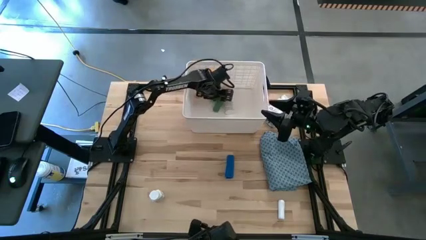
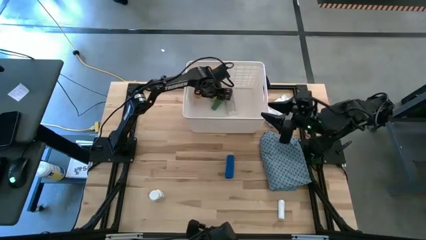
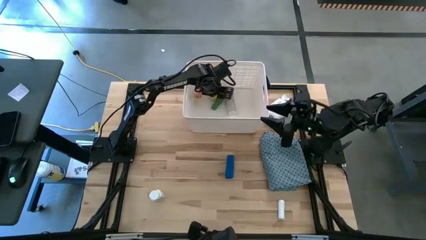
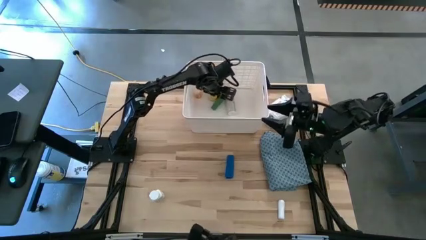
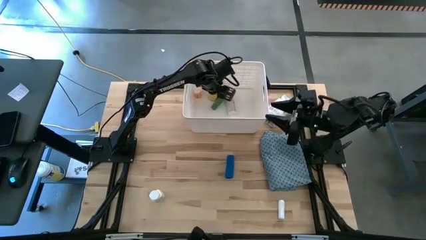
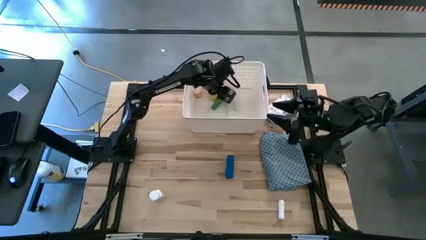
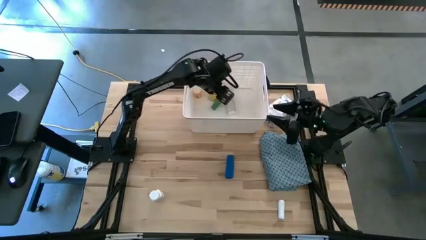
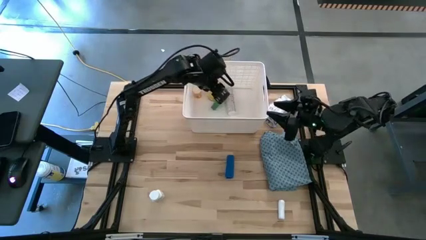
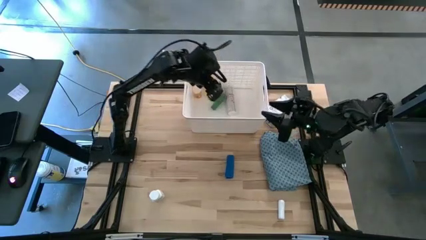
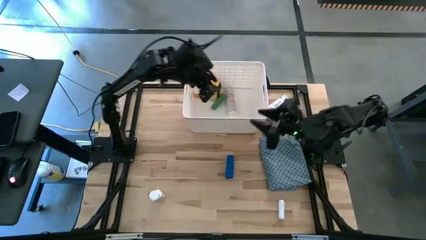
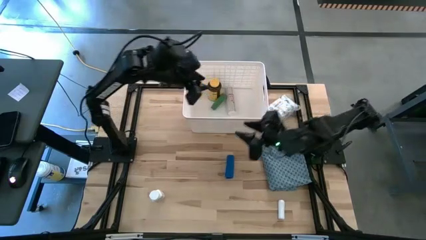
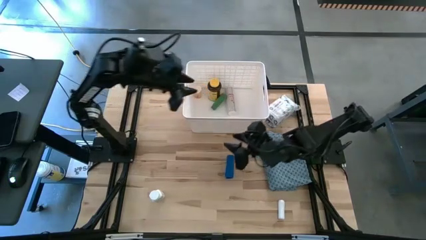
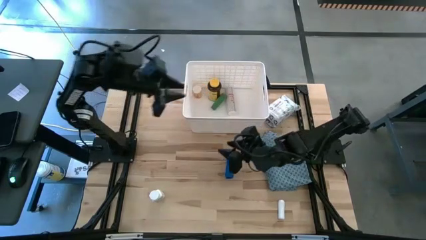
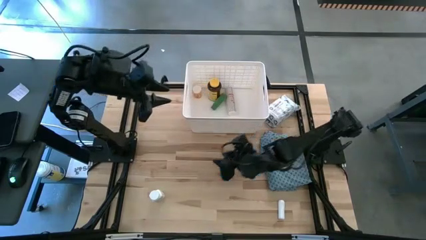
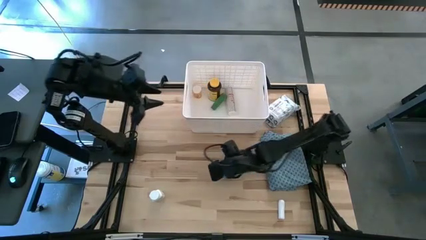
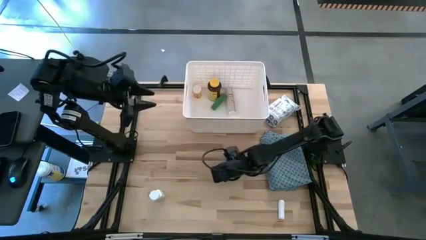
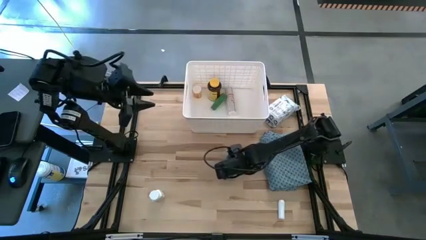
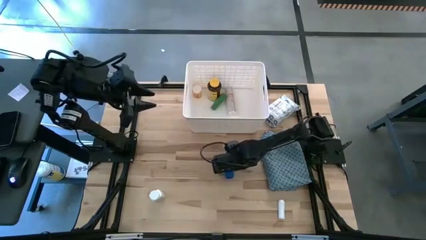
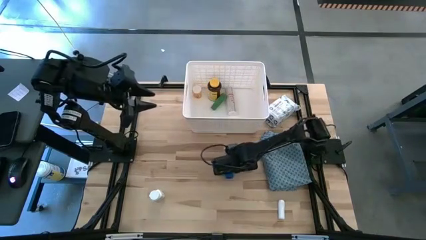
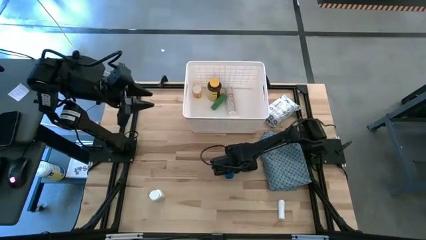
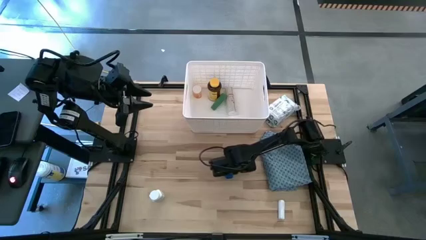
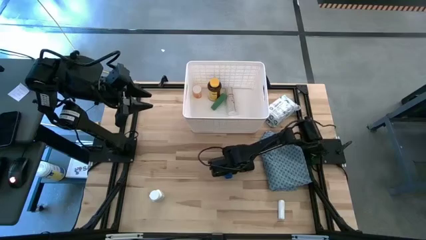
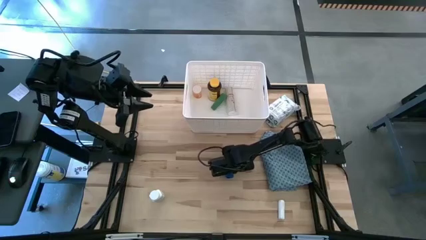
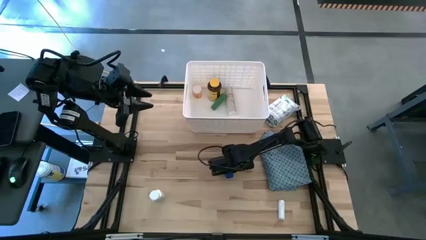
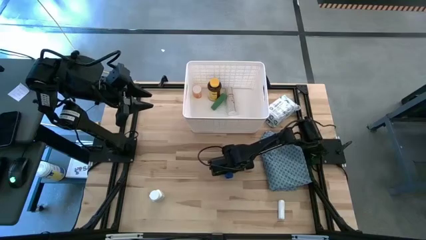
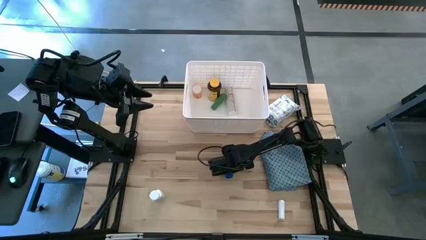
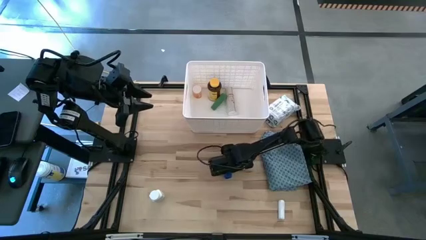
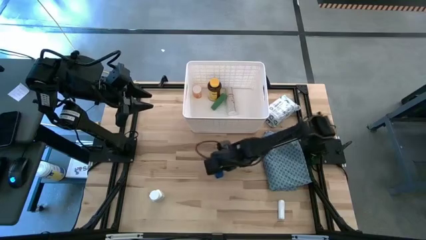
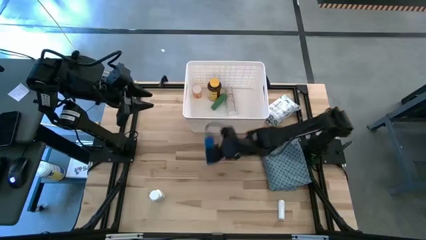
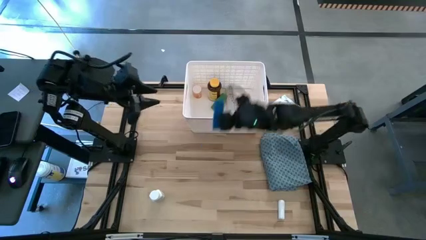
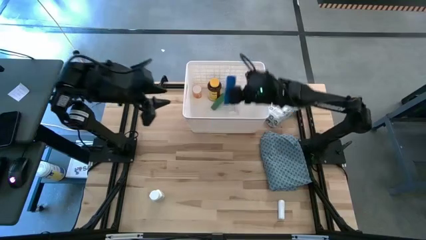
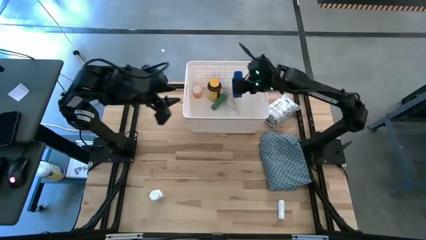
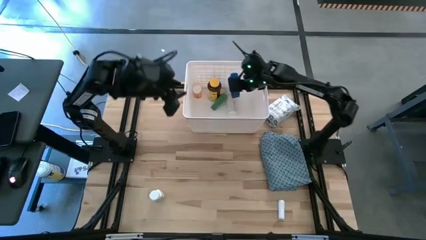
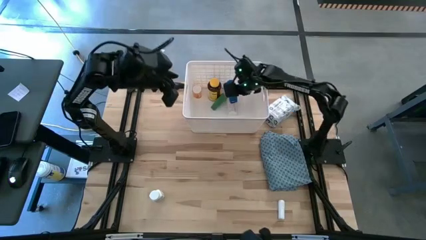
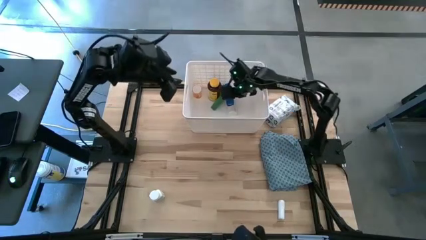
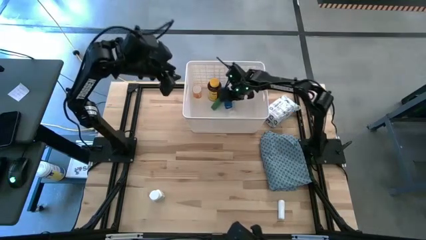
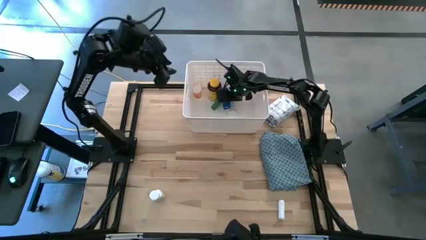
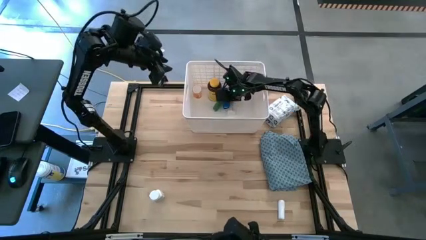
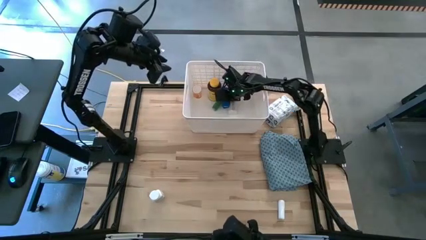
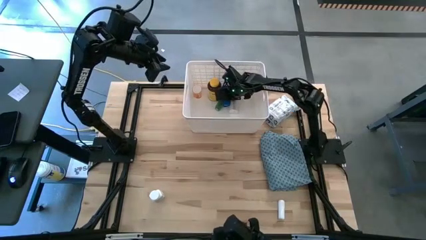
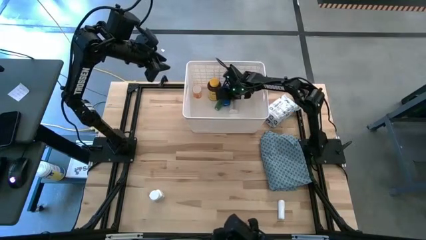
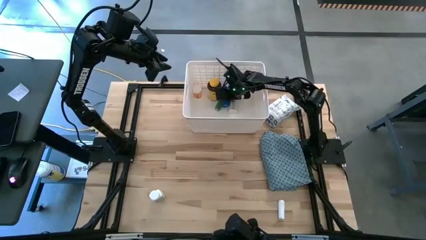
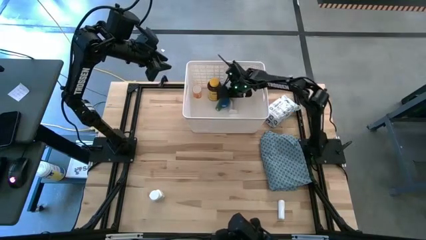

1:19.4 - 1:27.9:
Task: Pick & place medical supplies in basket/bin
Put the blue bandage into the white bin

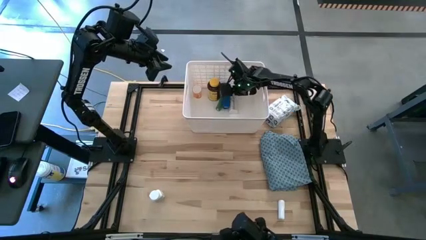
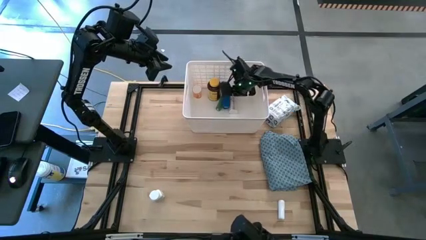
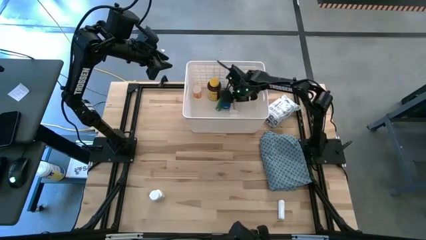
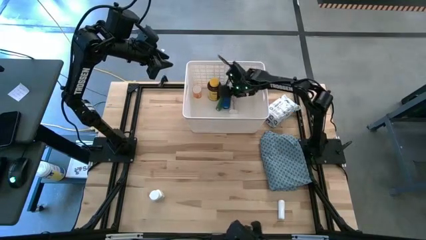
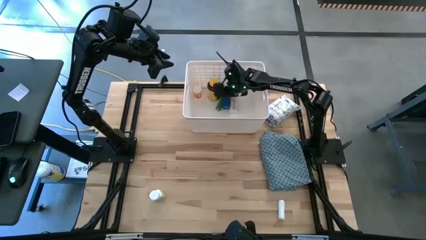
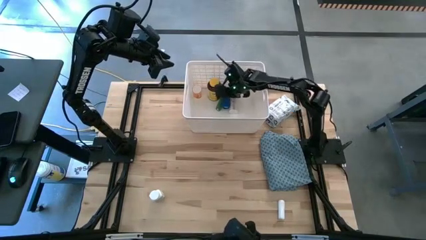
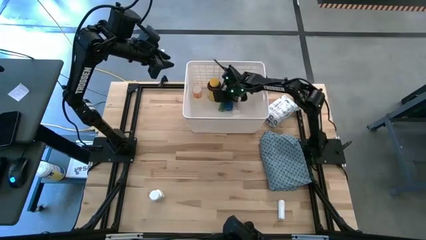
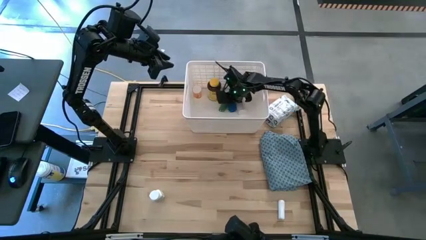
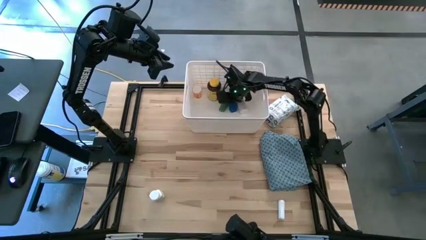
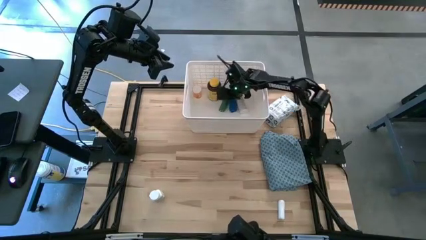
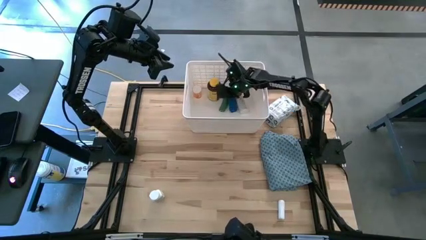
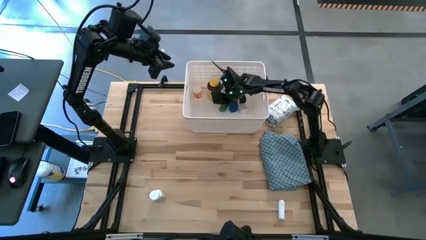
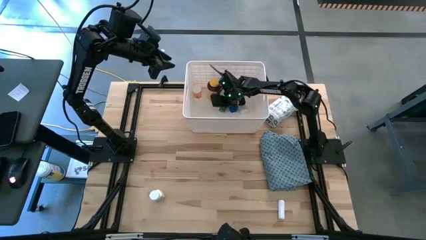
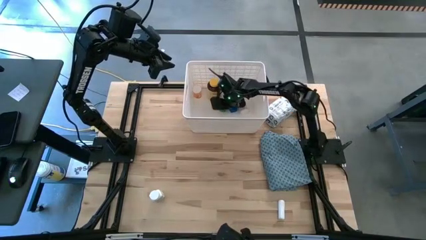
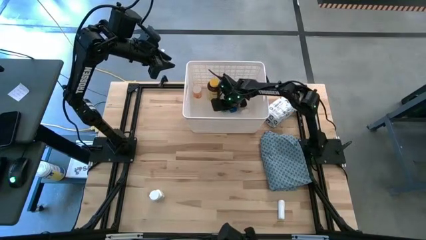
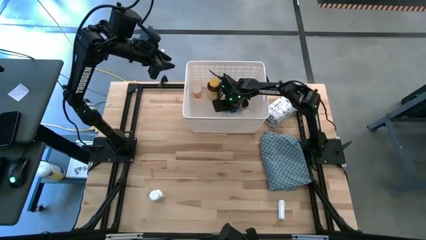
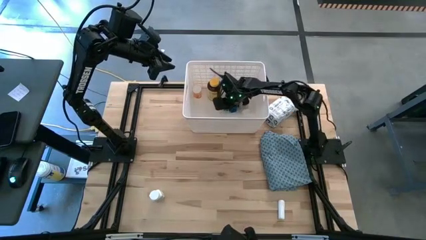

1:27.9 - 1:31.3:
Adjust the bandages in the white bin

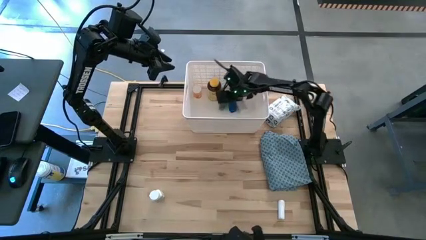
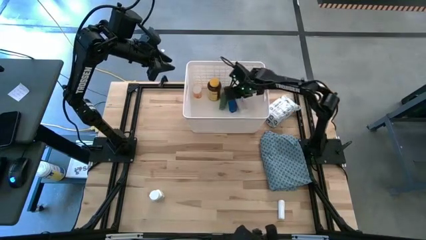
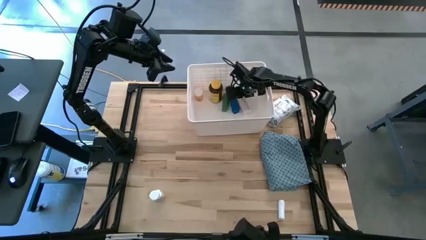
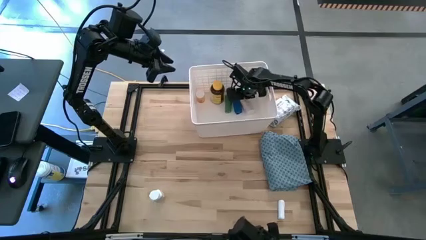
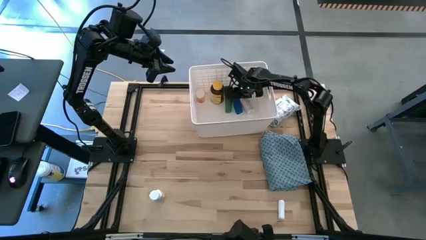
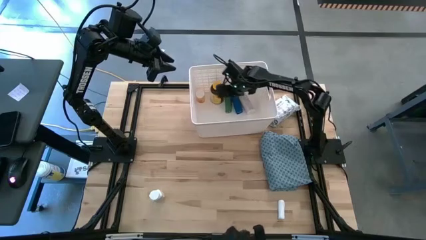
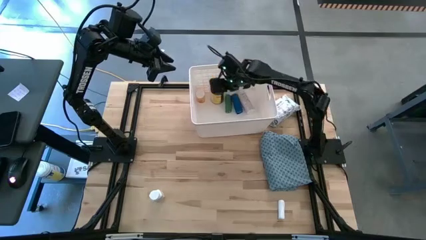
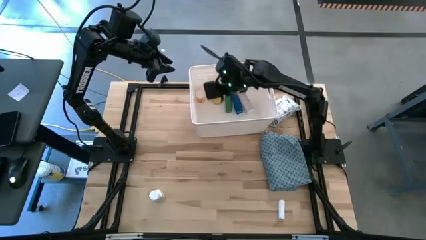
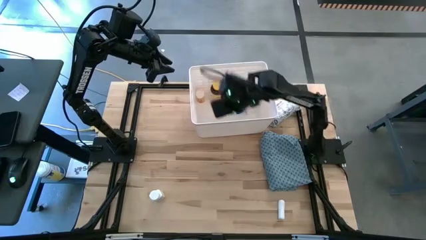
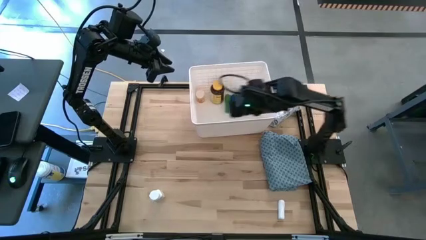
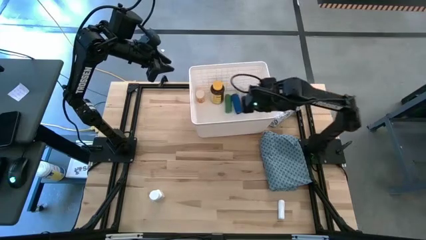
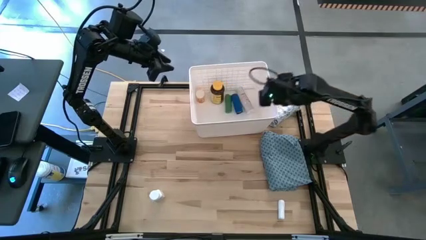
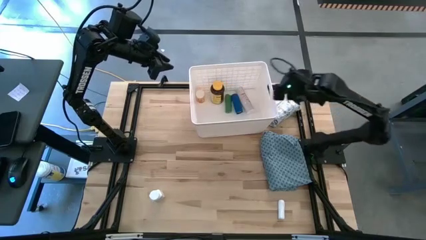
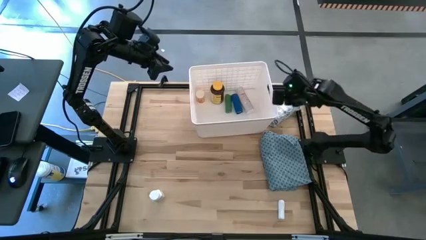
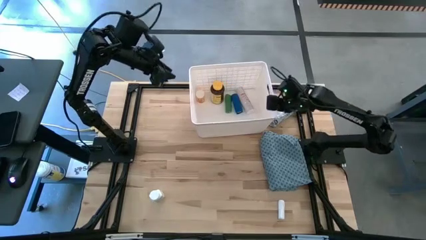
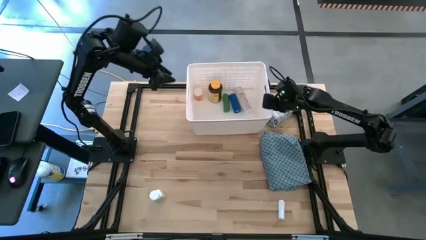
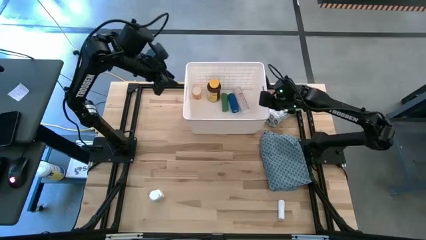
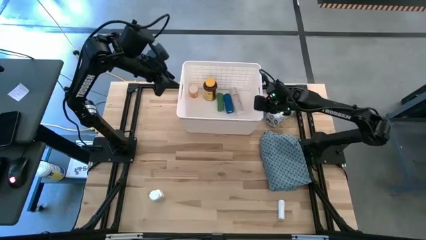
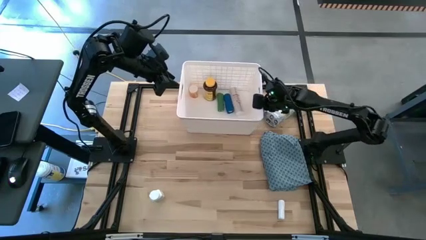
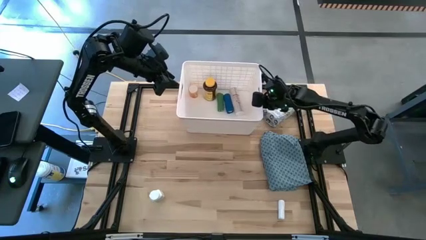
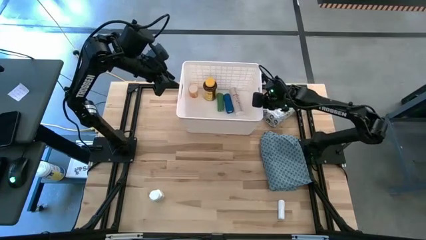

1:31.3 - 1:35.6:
Adjust the white bin

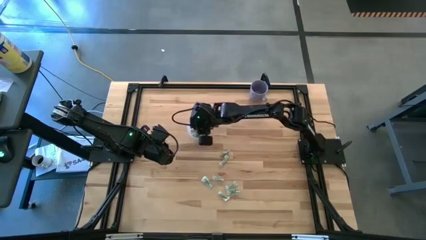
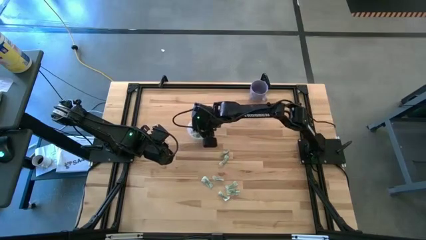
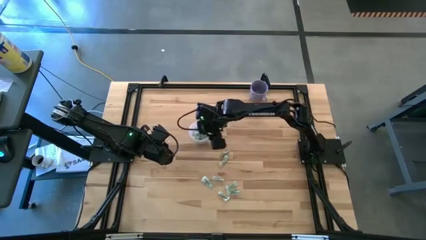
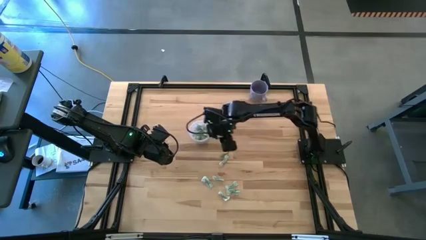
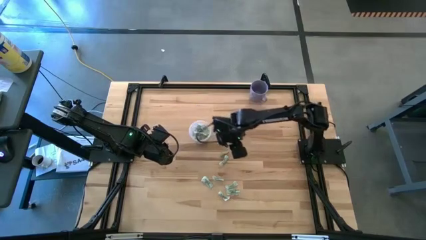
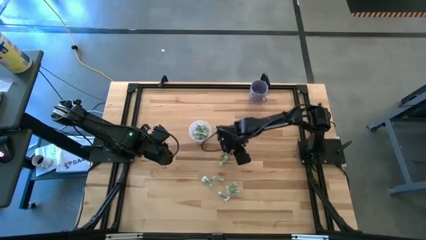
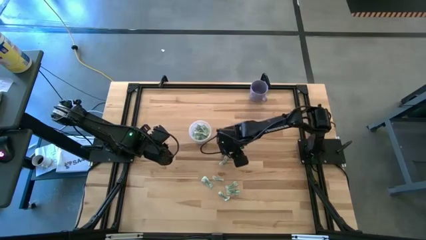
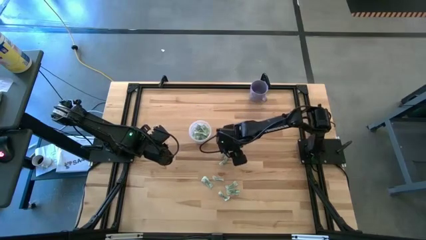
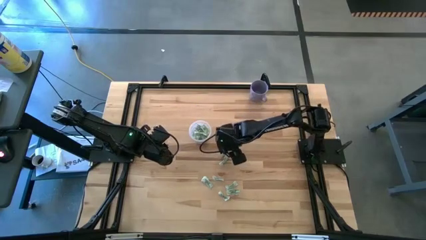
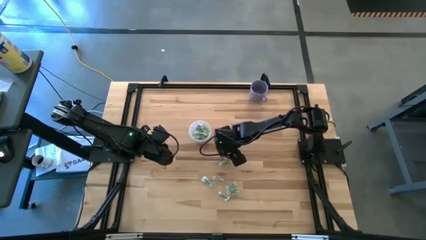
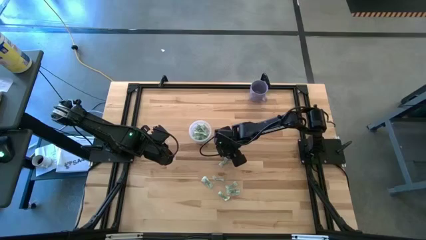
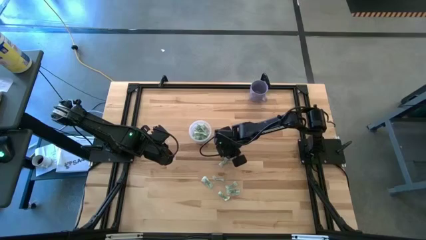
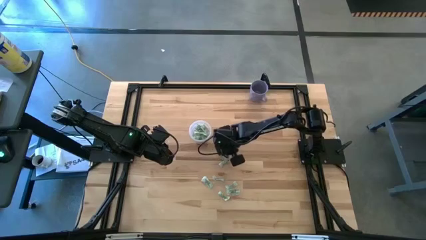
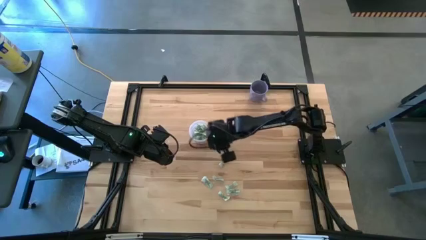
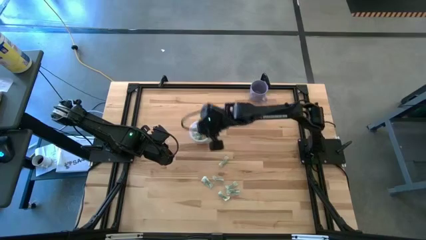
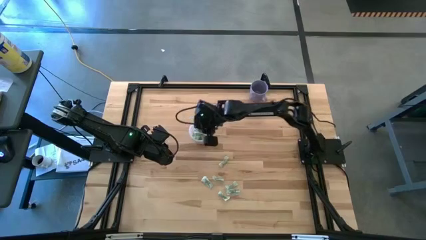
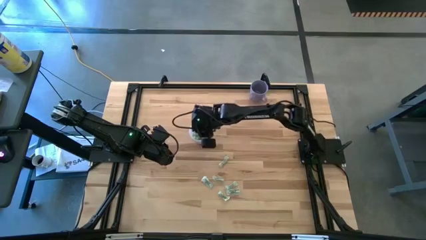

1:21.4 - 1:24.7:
Task: Pick and place Stevia / Truvia into bins
Put the white stevia packet into the transparent container
